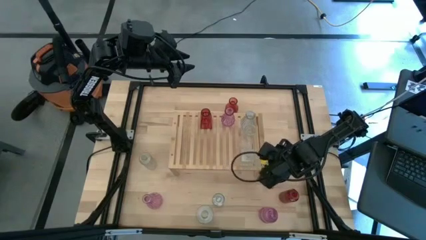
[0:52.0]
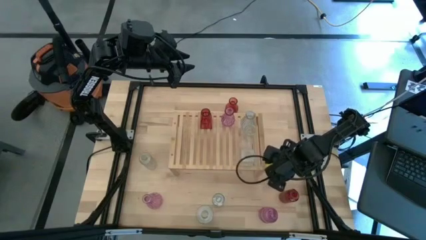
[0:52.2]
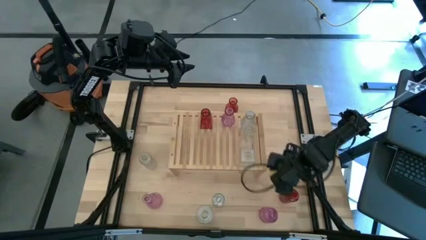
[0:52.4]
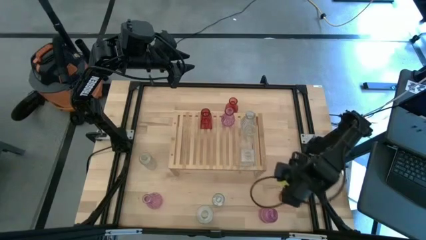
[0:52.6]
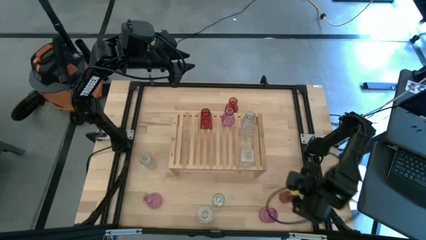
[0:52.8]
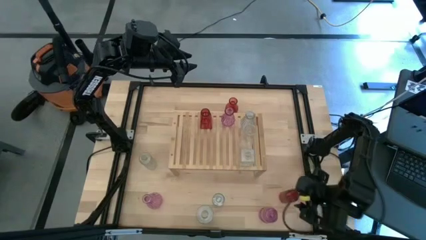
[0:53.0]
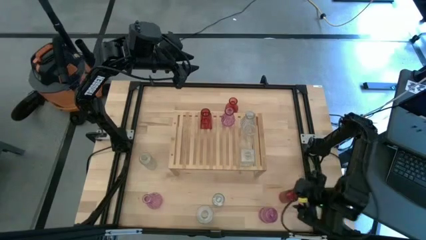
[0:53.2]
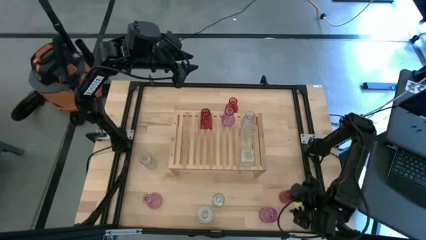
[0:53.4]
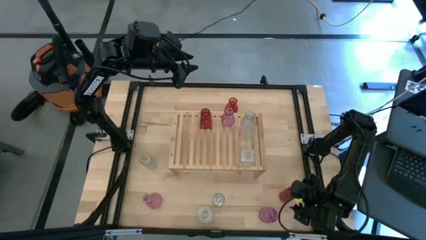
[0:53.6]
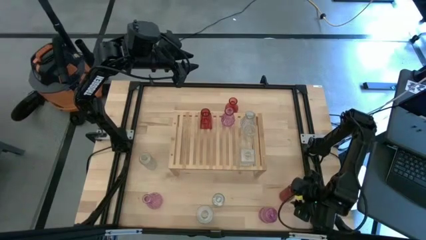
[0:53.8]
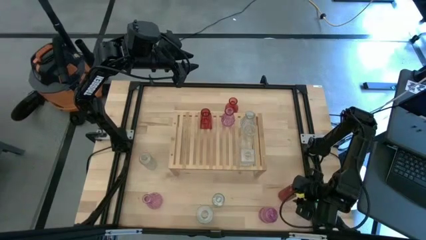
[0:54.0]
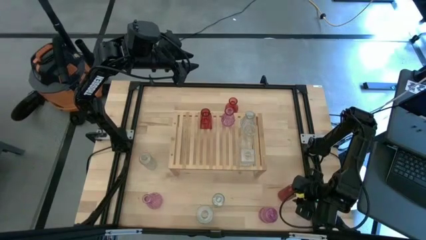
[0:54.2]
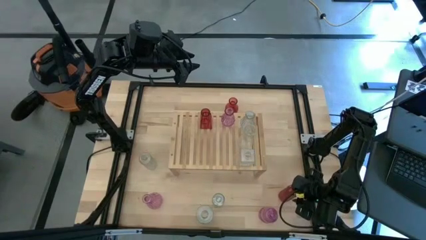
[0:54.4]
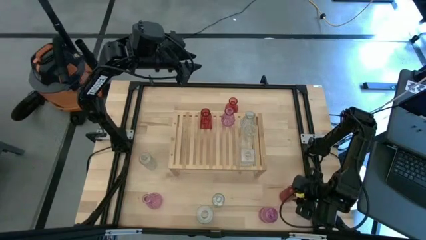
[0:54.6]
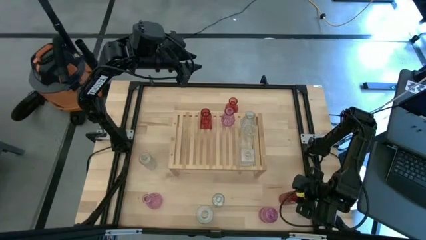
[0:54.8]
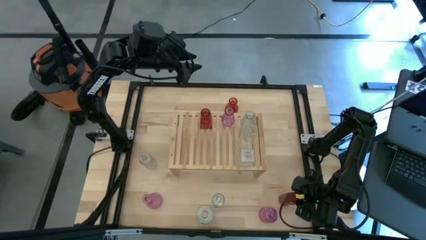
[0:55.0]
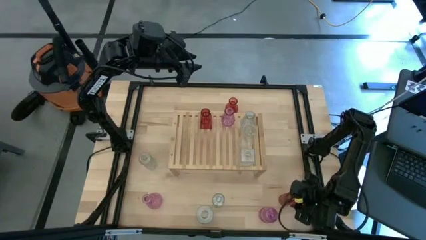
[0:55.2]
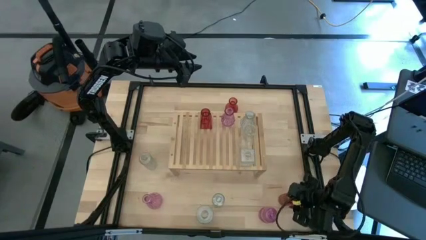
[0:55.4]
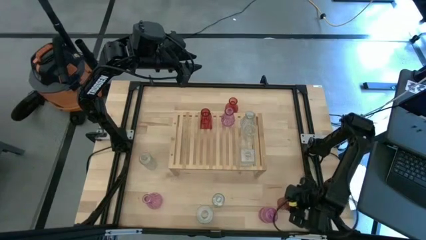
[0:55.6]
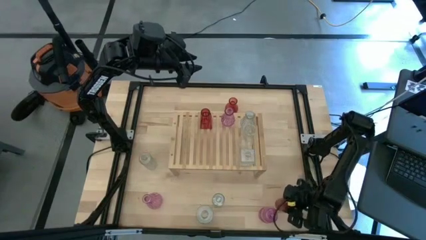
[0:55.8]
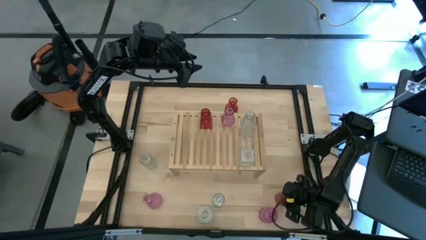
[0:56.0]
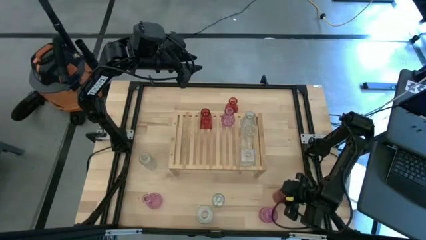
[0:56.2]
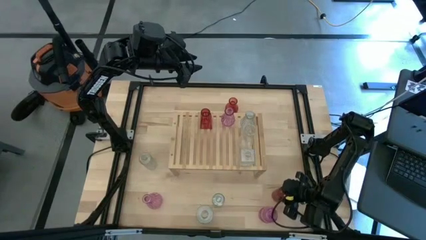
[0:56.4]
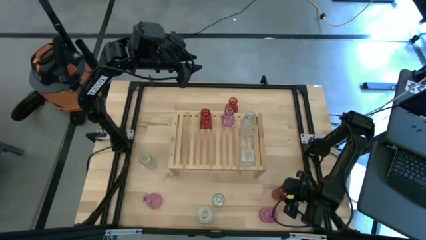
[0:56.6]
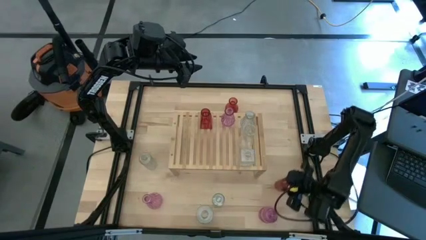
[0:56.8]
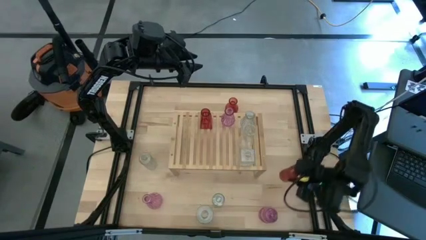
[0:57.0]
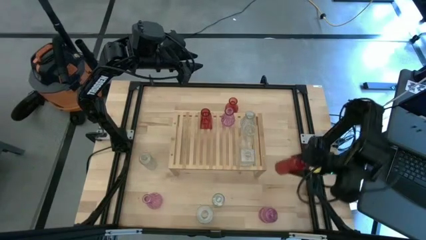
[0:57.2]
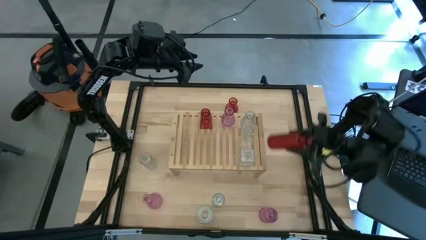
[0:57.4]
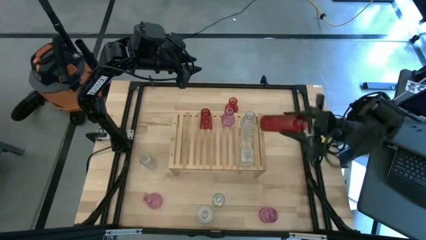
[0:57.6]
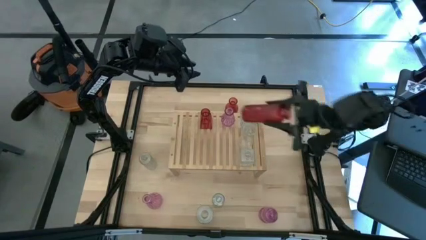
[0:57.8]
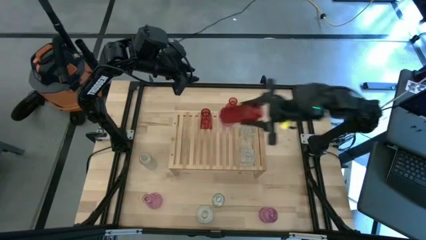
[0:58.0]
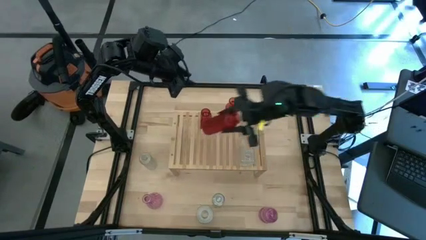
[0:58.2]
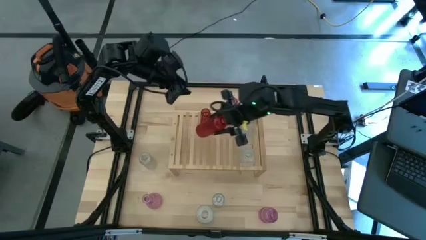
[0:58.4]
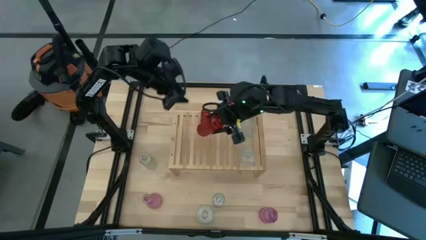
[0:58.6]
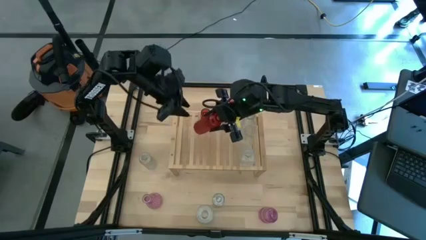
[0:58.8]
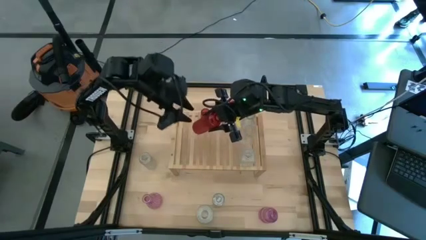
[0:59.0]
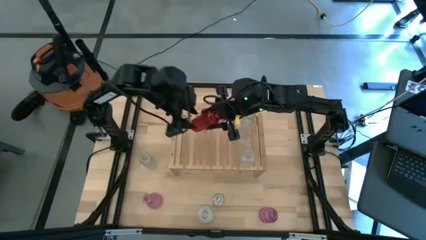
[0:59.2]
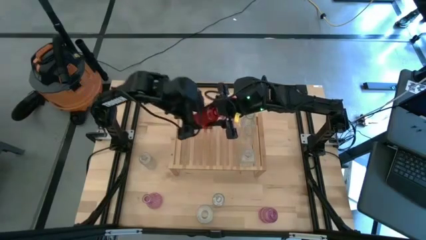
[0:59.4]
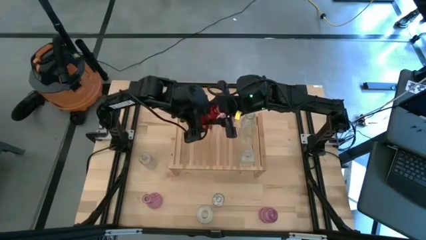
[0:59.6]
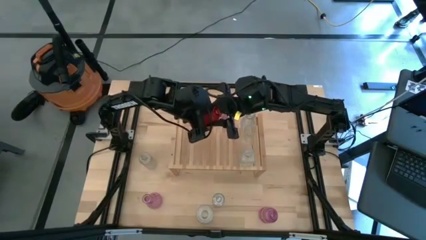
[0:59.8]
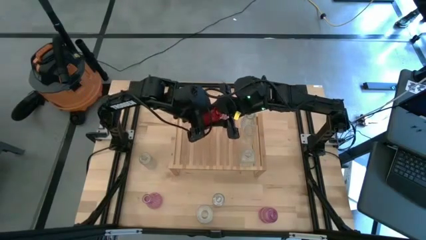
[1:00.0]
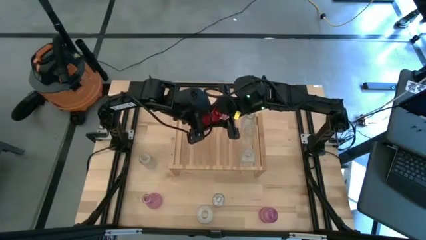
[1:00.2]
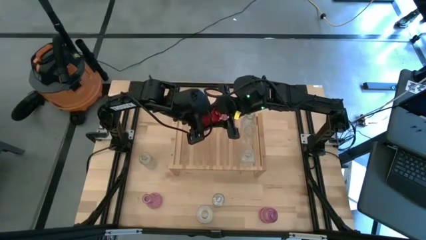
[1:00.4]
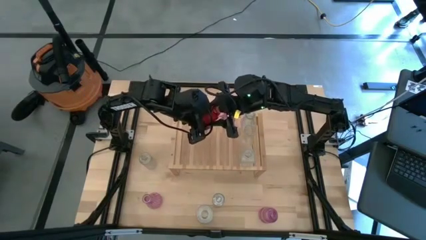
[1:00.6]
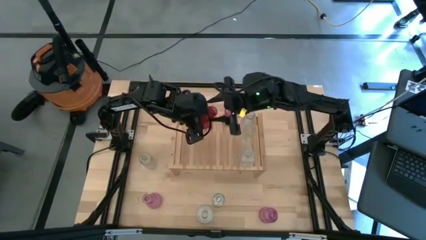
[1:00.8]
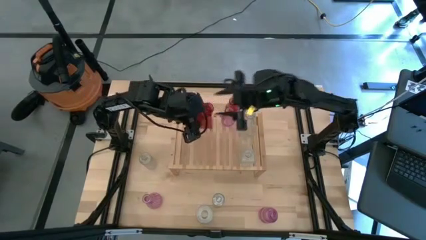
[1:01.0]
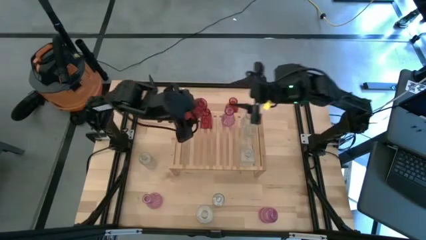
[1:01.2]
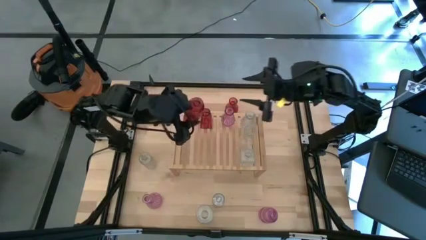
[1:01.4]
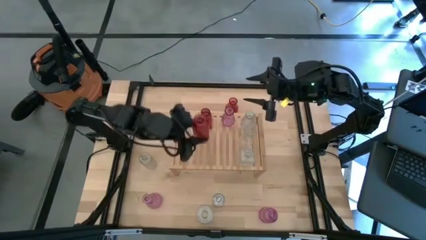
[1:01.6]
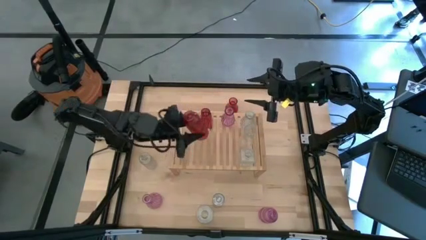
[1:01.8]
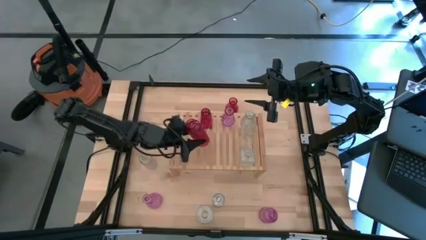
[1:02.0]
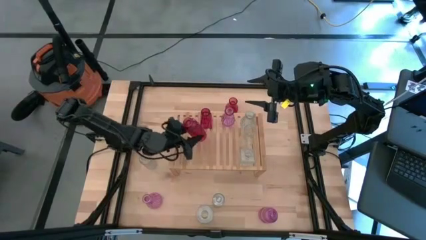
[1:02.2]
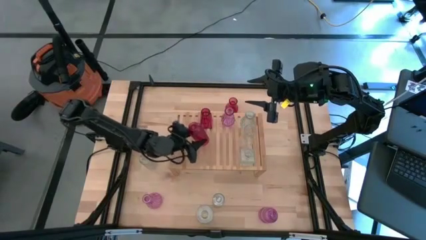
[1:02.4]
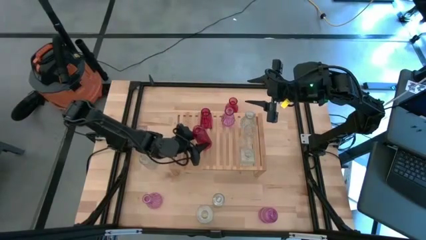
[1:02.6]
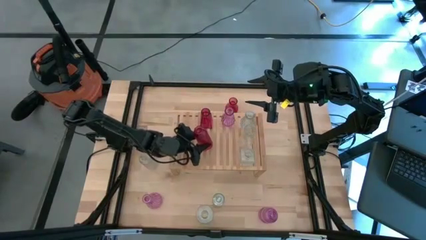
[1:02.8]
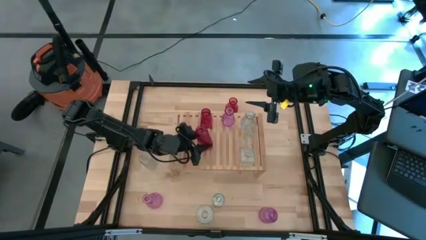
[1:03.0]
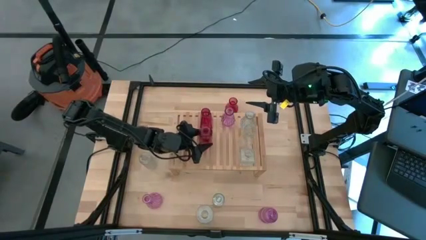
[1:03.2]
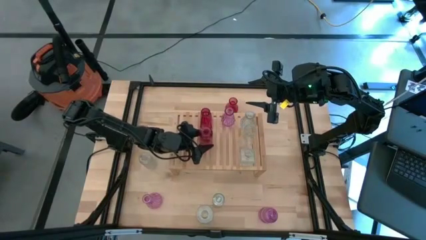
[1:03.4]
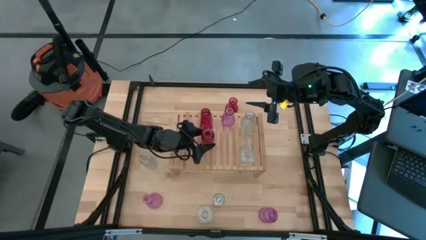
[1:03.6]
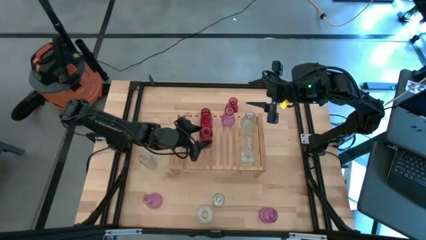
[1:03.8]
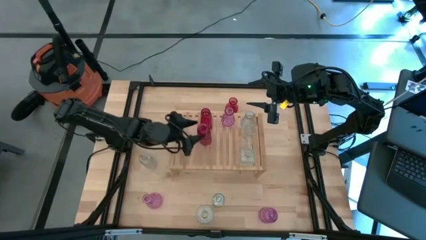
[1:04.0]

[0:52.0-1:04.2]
Task: sort vases onto shelf
Put the red vase on the shelf aligned with the other red vase

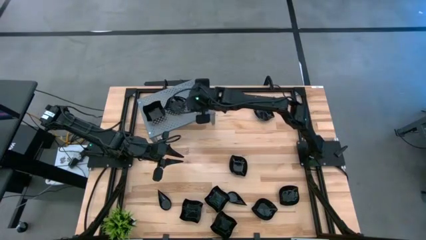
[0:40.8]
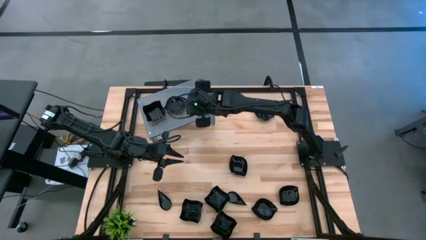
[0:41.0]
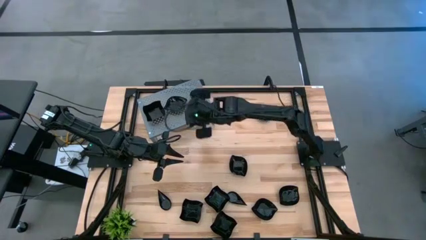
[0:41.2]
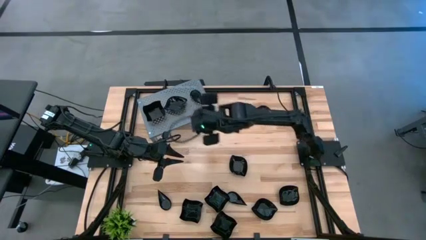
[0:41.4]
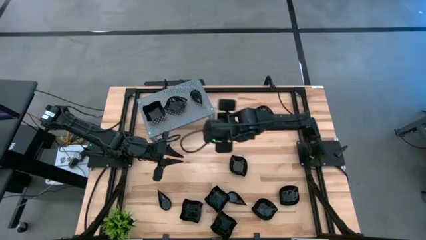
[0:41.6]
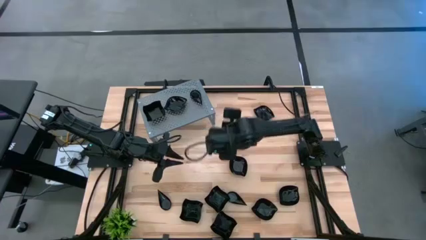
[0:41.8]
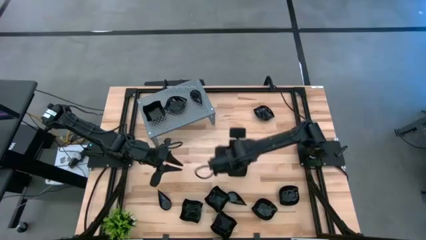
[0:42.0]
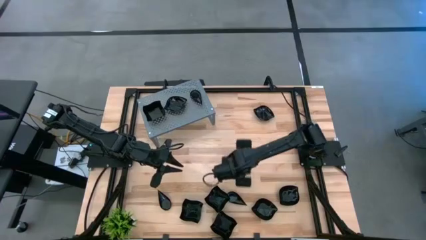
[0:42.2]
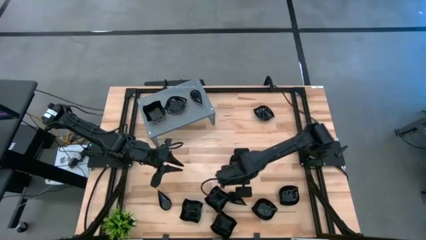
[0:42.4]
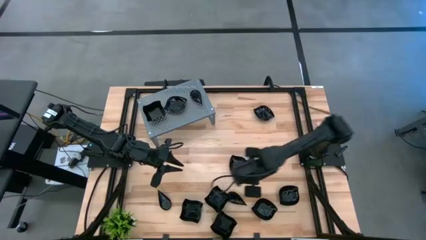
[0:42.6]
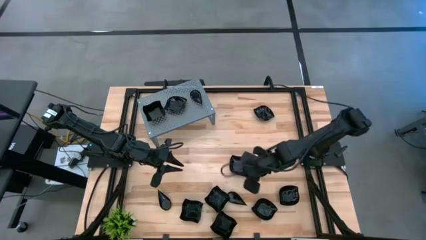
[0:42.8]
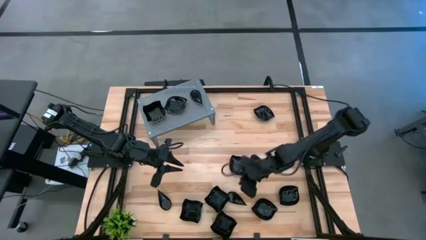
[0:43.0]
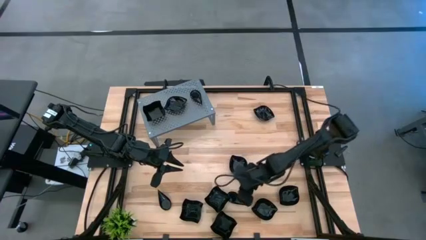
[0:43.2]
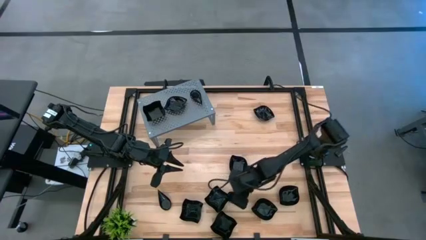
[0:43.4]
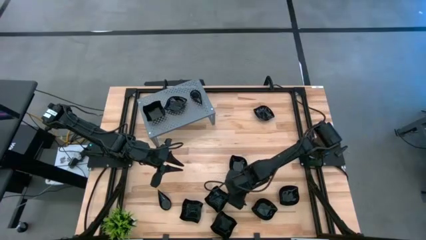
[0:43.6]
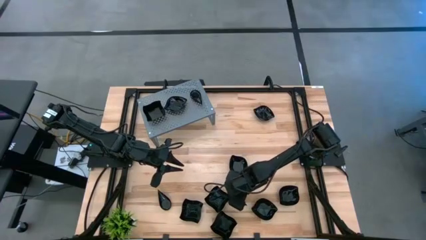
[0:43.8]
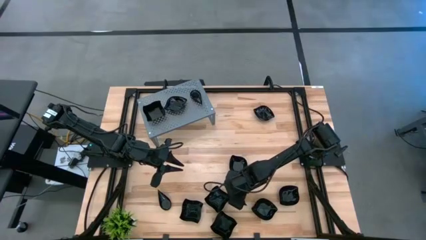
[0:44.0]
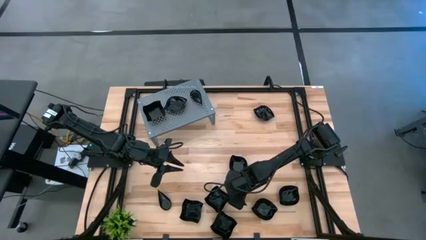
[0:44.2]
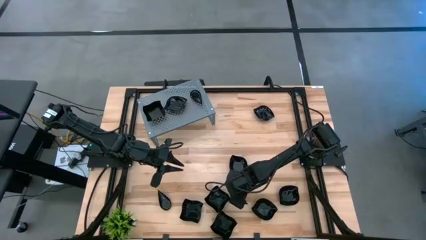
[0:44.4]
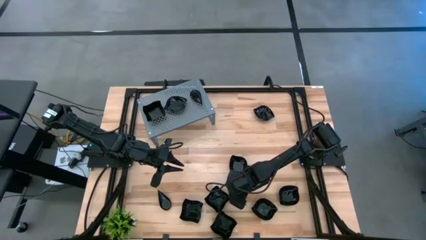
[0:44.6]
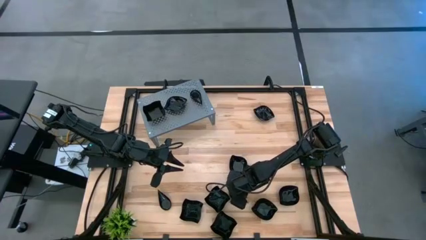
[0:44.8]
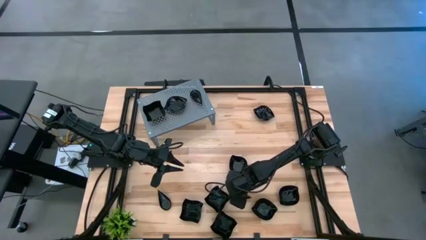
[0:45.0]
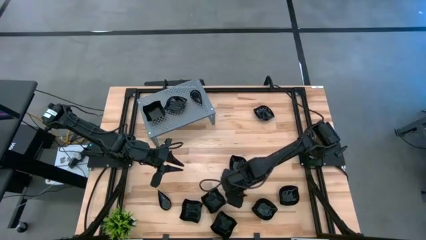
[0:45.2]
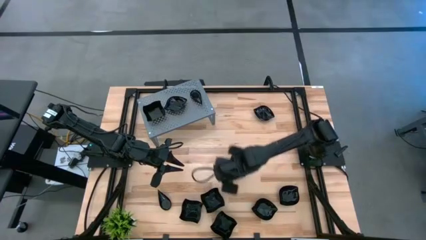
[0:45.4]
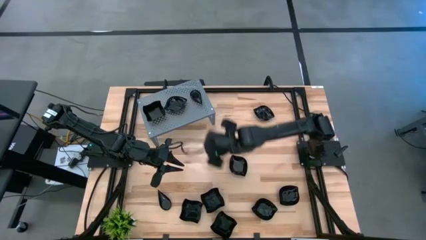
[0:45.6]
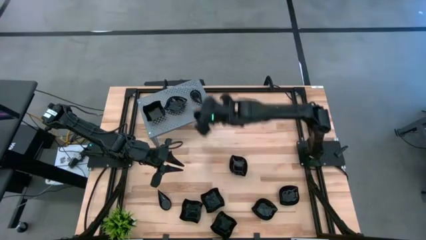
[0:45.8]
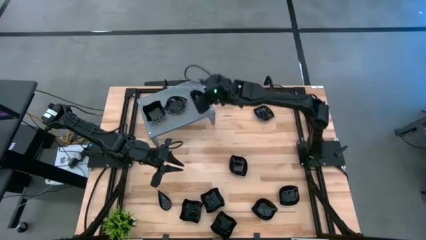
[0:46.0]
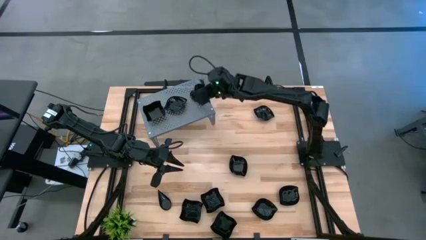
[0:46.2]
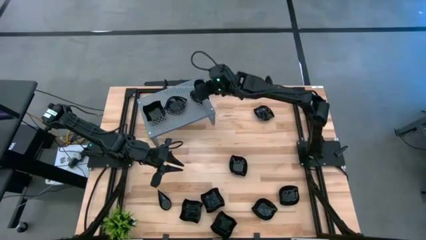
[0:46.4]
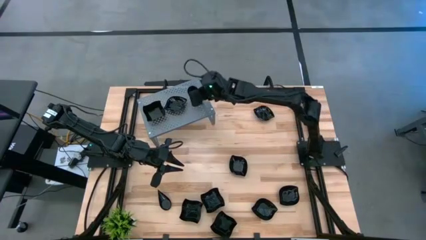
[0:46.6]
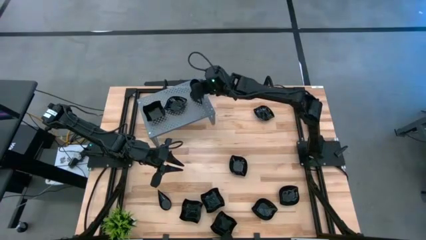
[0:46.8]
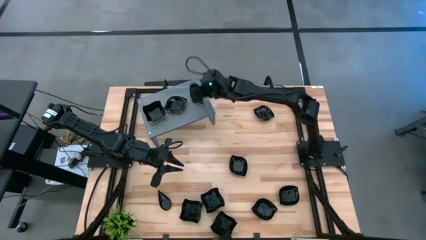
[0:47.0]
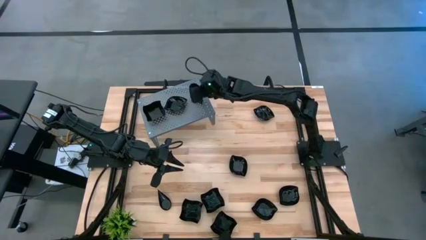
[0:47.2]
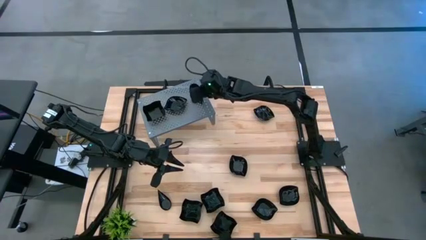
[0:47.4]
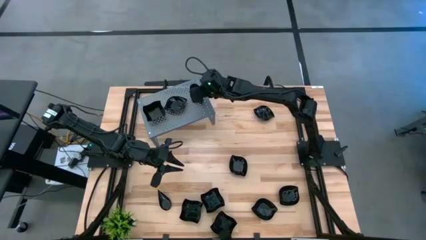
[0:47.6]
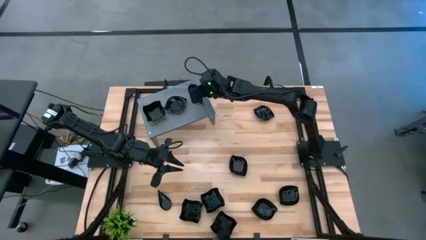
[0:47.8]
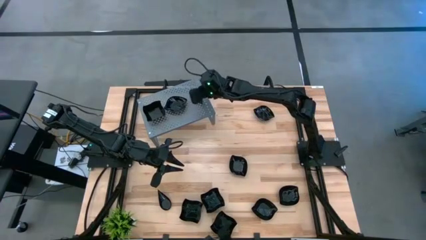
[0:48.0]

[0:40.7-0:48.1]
Task: Pick & Place Mini shaped plates
Stack the black drop shaped plate on top of the black drop shaped plate on the shelf
